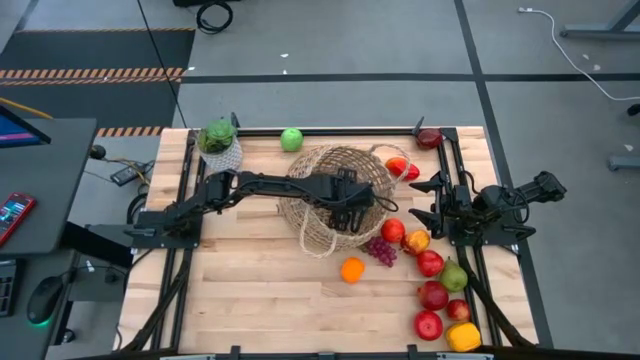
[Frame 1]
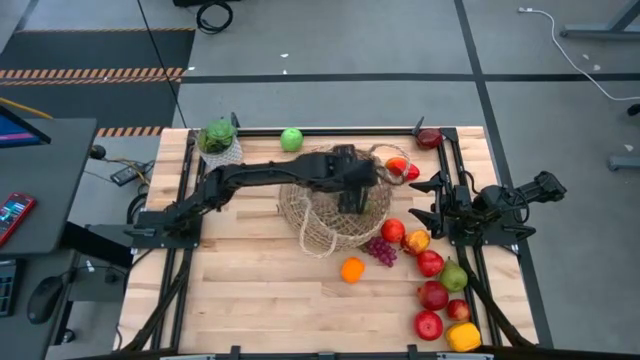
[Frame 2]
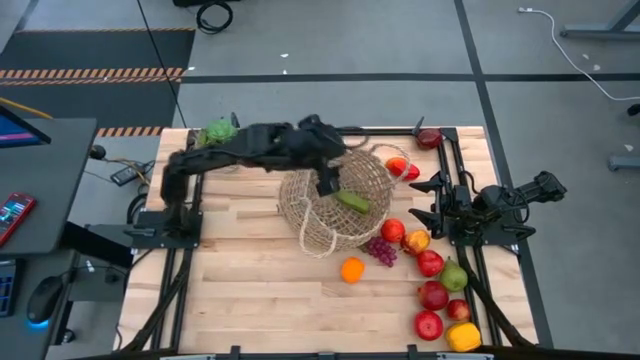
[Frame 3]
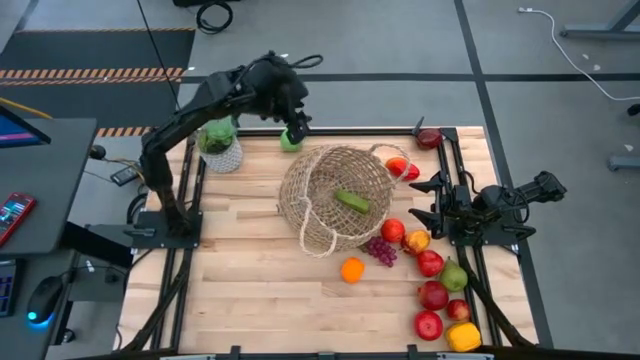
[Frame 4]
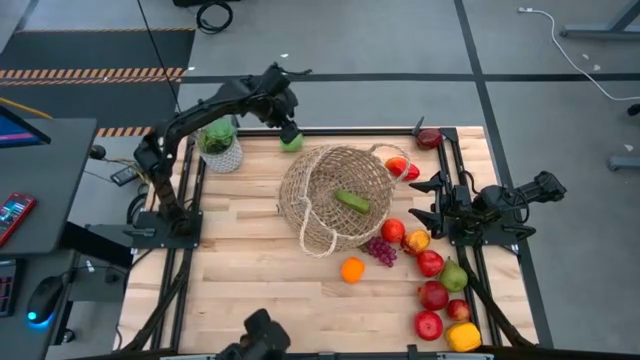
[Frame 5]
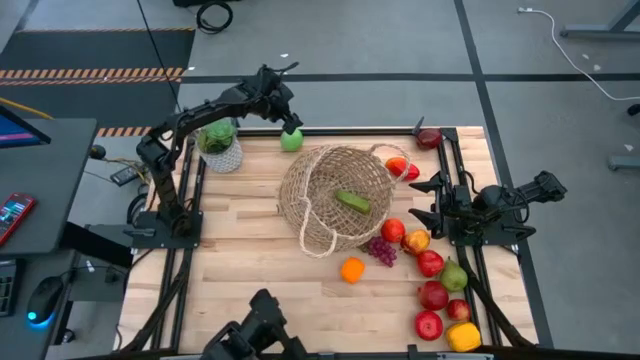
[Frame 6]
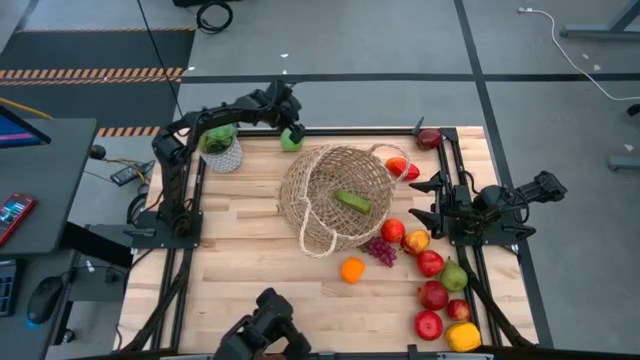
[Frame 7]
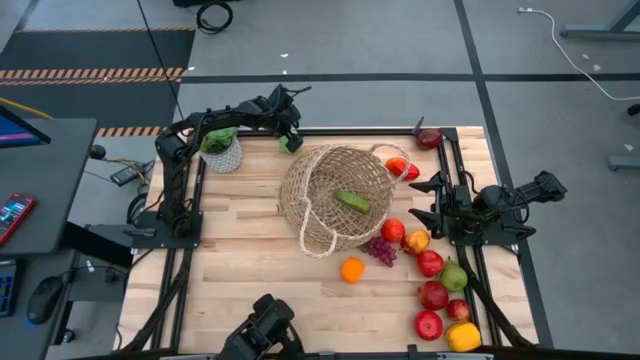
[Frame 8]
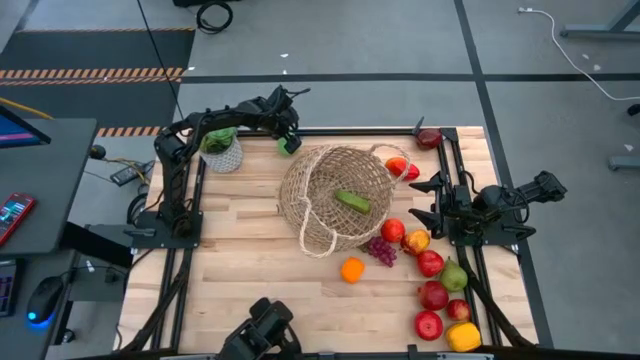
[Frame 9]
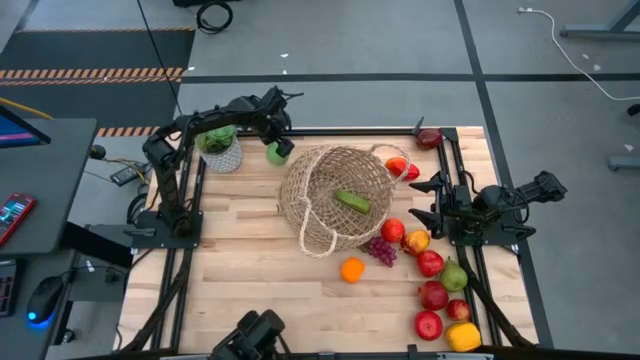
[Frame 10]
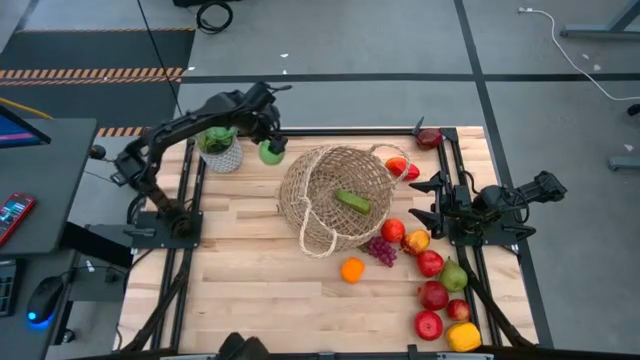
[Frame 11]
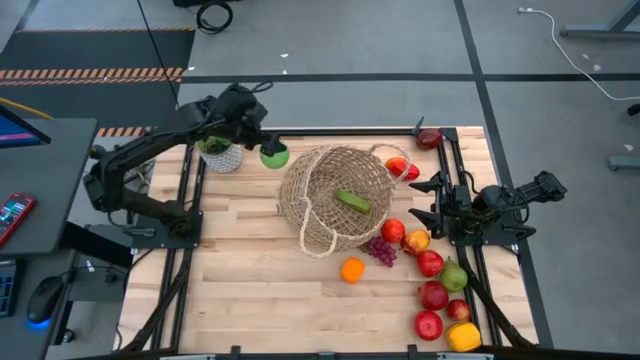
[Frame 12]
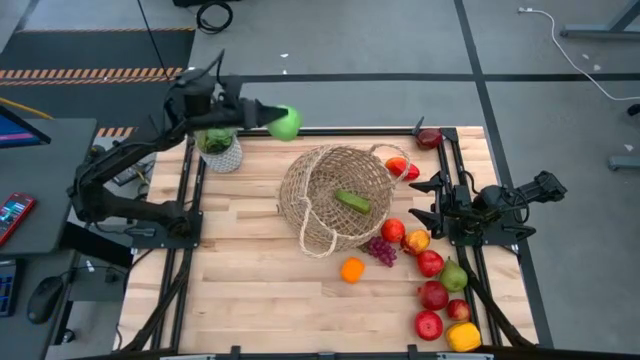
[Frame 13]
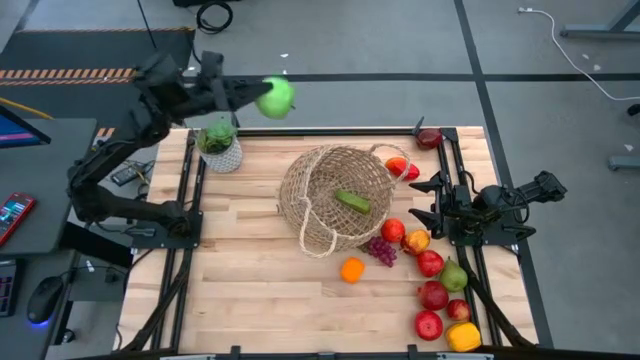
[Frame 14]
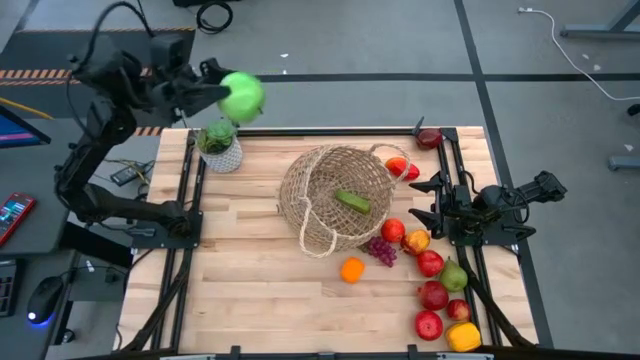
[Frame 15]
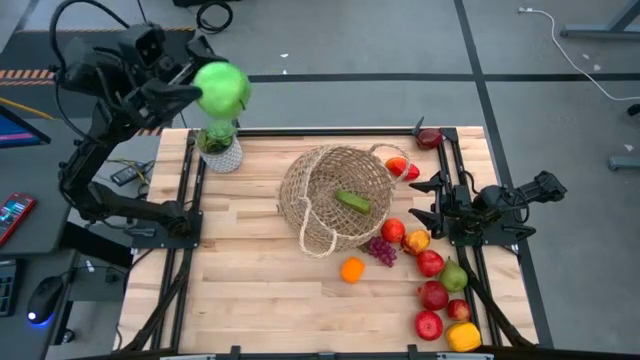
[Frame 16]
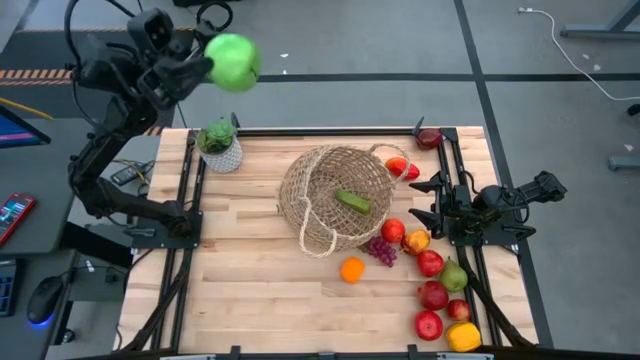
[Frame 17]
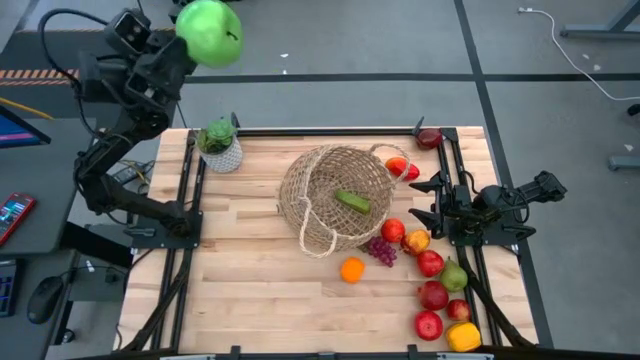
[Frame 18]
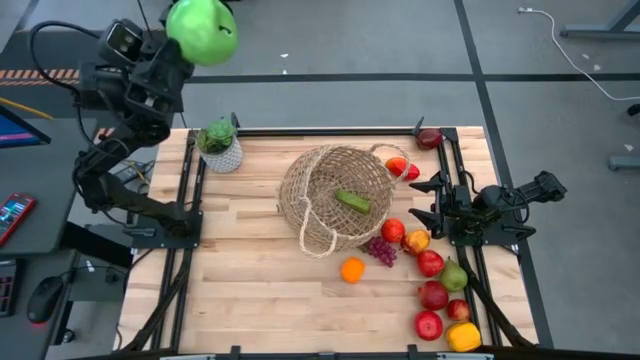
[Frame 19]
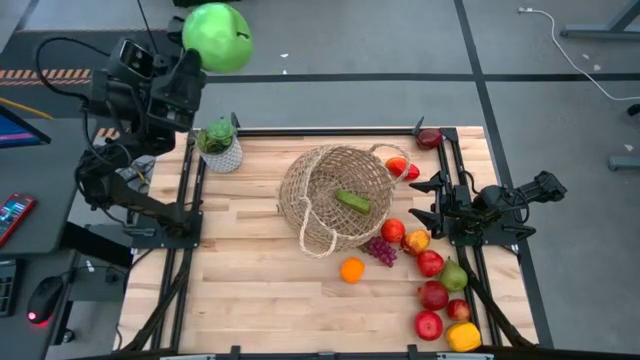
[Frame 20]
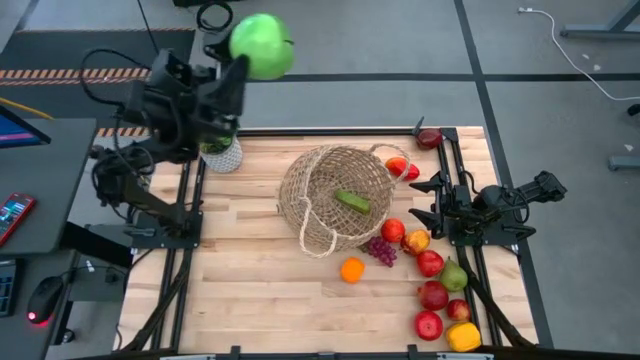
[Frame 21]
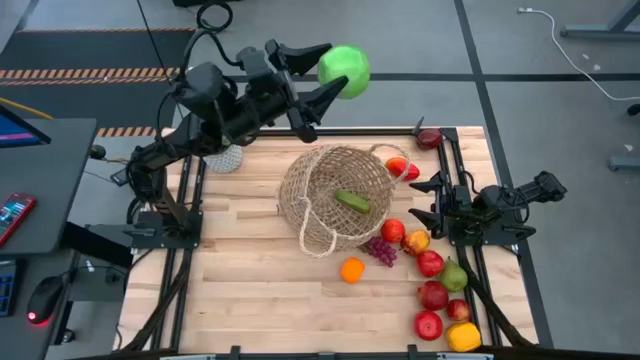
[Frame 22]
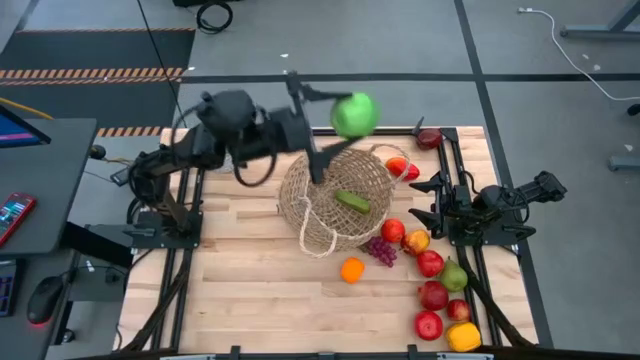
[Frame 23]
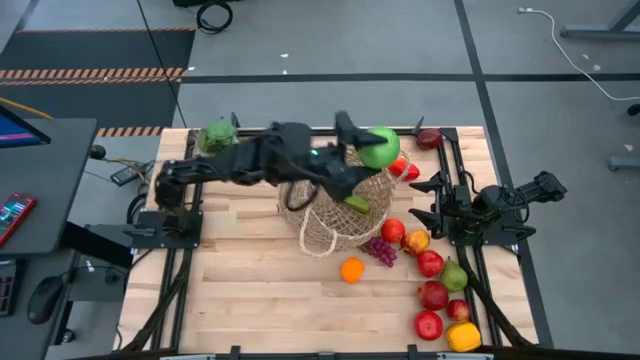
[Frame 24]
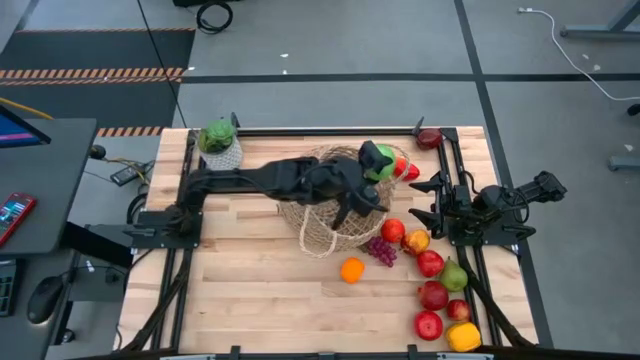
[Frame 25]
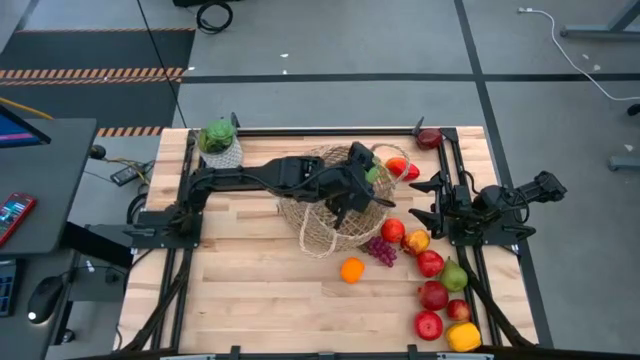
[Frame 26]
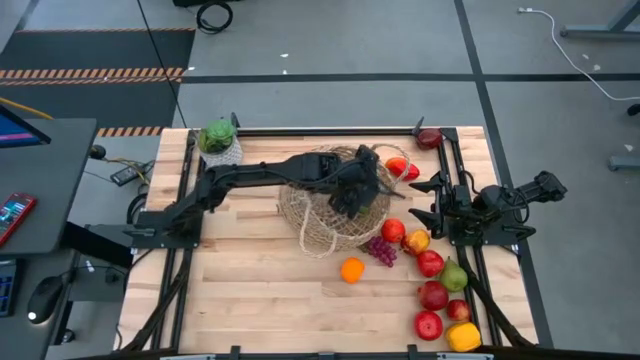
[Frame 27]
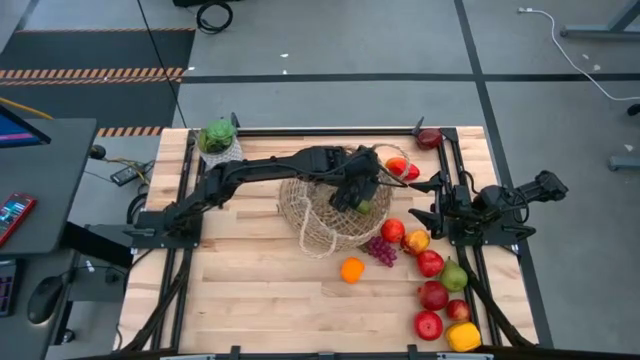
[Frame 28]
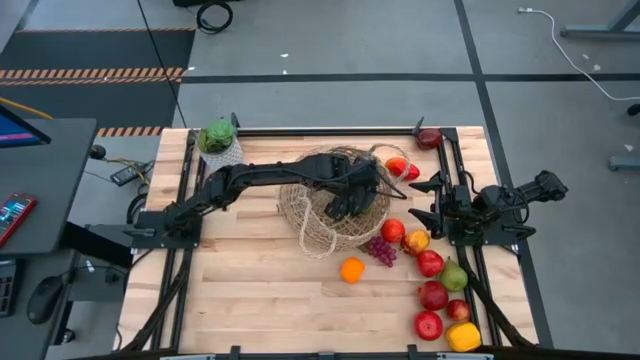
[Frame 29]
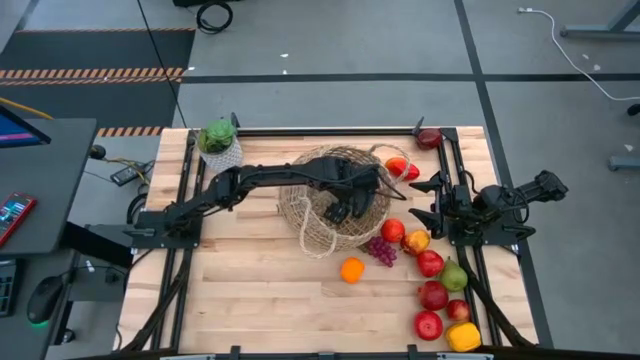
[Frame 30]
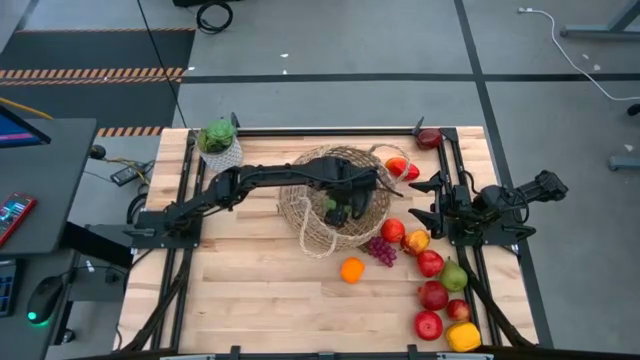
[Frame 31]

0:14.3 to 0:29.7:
Task: Build produce basket
Put the green apple into the woven basket

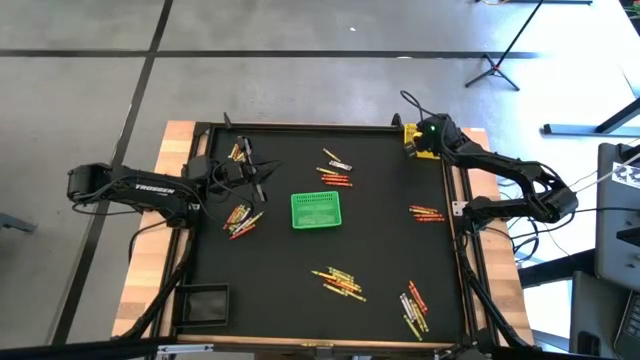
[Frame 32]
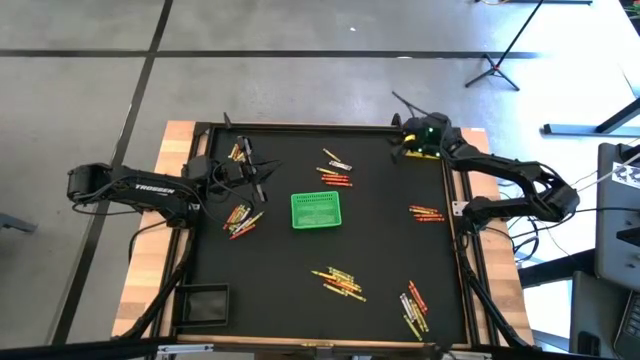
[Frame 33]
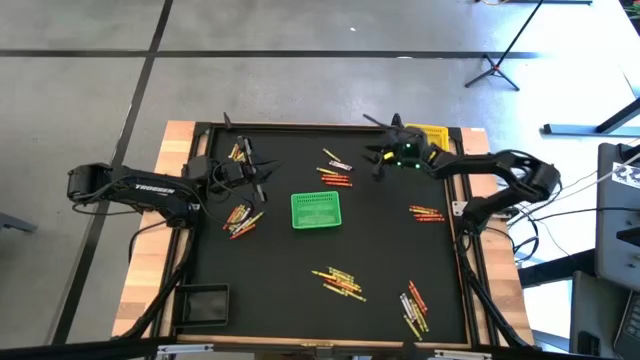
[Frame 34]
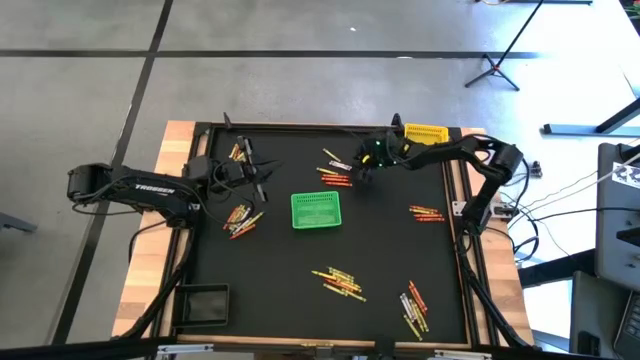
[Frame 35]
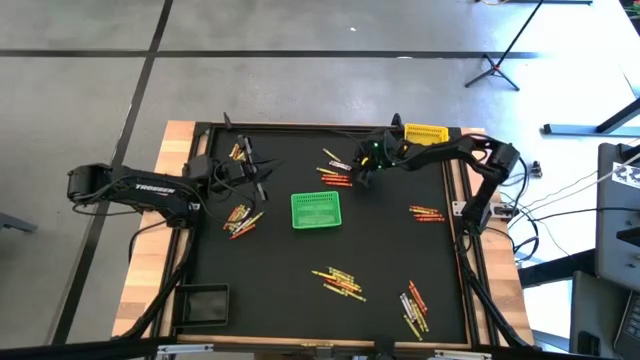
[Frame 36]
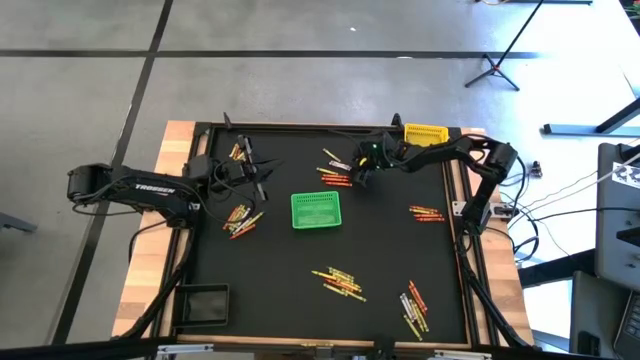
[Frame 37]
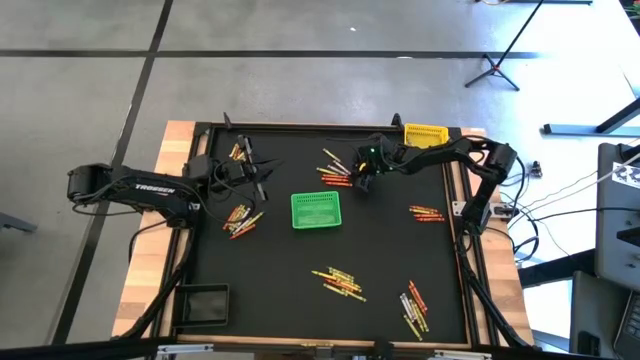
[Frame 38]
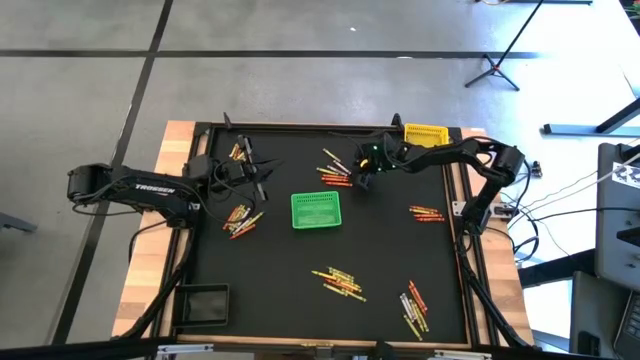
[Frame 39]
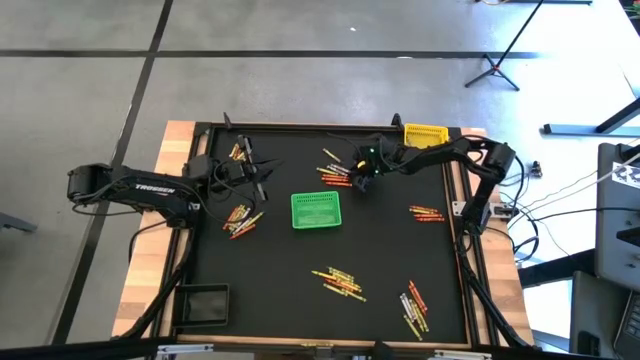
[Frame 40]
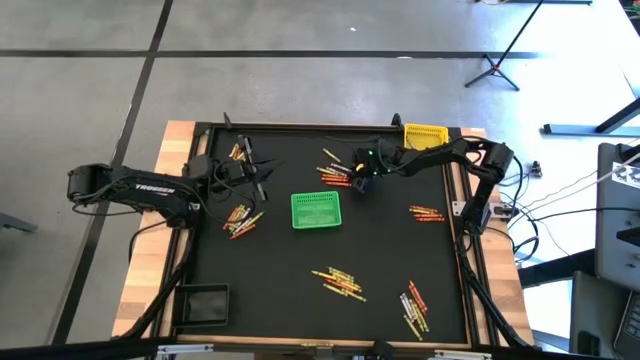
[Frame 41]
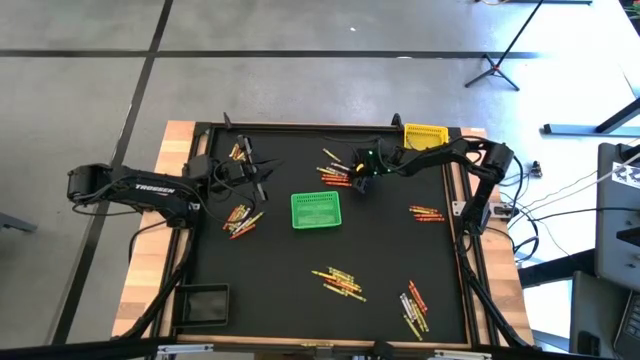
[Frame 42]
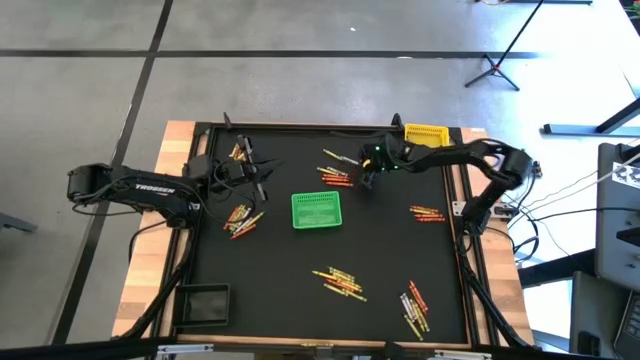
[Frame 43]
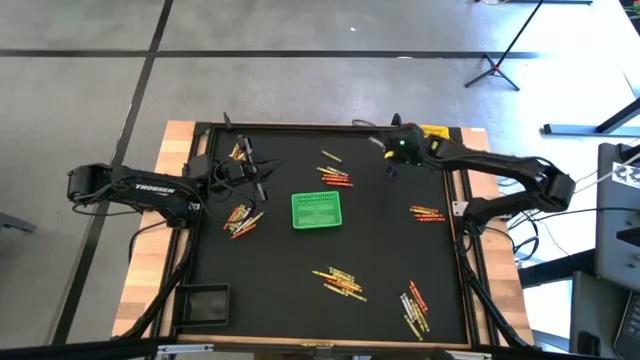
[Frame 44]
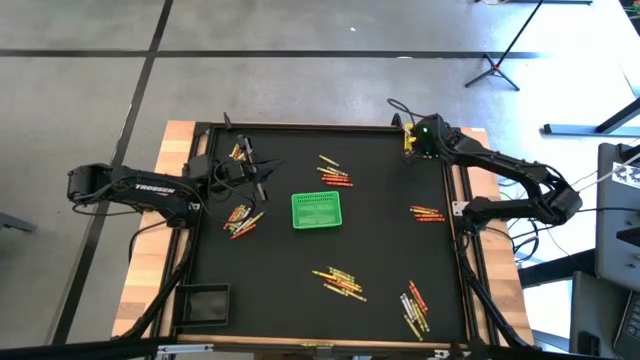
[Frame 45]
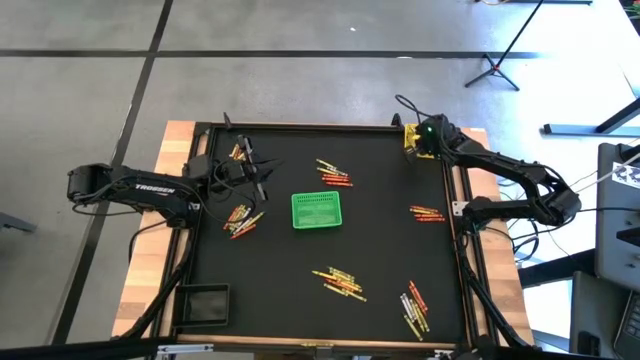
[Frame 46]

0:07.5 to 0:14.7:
Task: Sort crayons
Put the black crayon into the yellow bin
